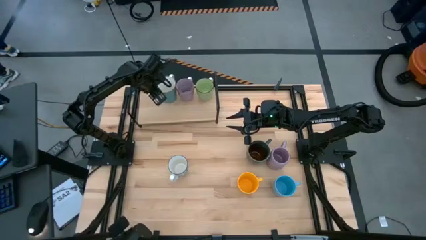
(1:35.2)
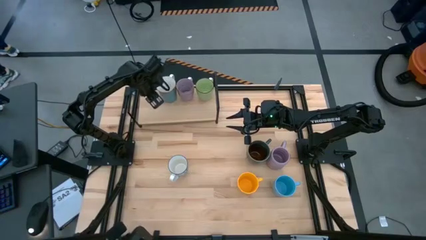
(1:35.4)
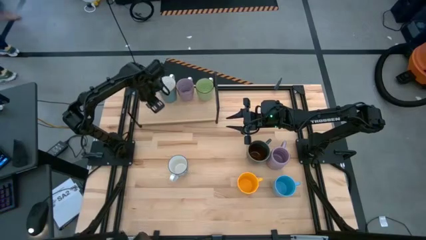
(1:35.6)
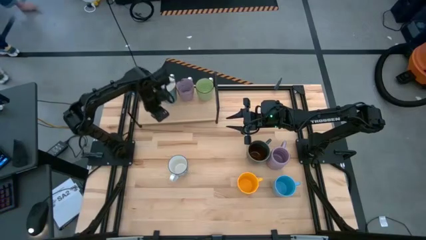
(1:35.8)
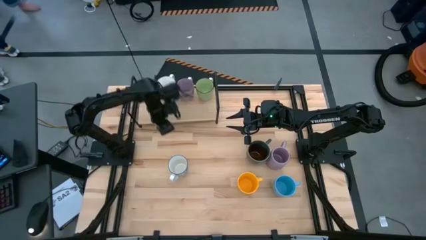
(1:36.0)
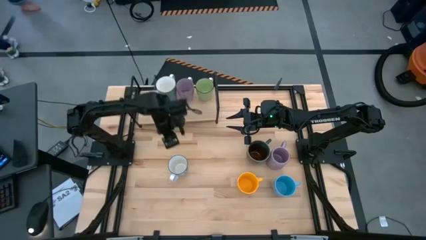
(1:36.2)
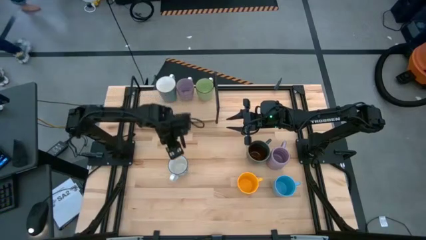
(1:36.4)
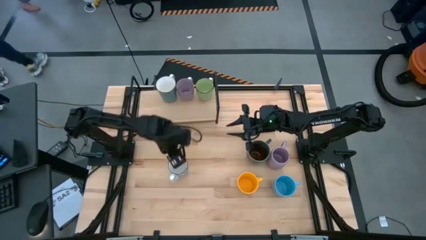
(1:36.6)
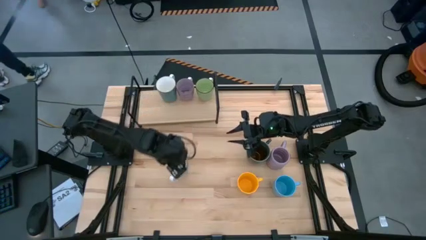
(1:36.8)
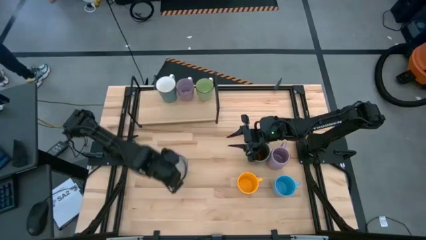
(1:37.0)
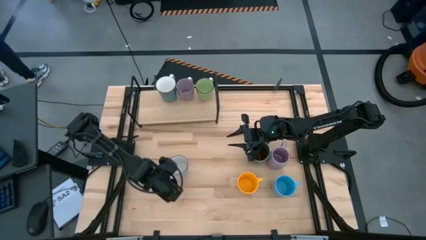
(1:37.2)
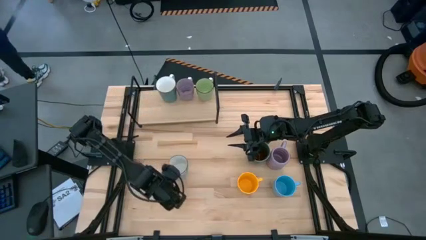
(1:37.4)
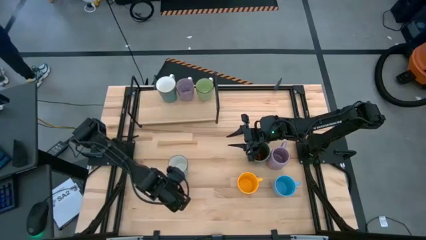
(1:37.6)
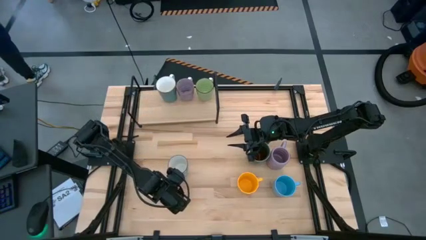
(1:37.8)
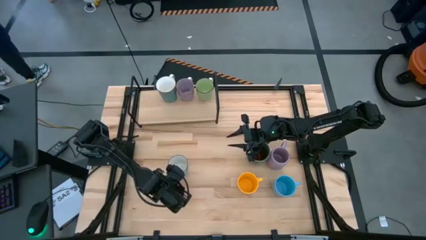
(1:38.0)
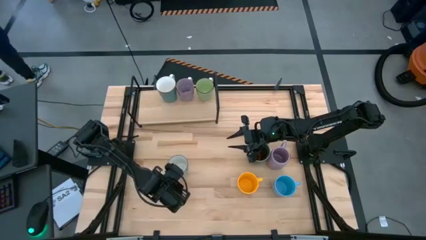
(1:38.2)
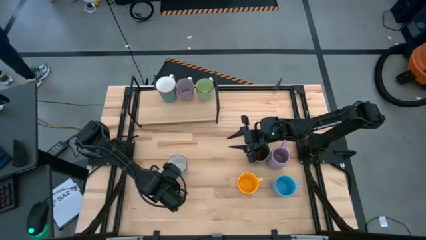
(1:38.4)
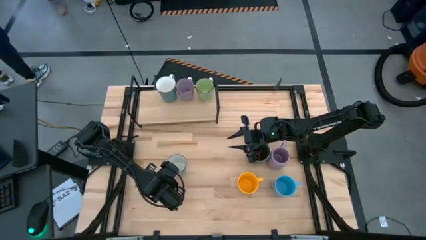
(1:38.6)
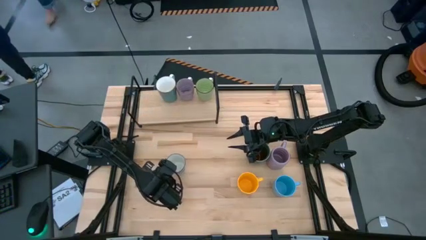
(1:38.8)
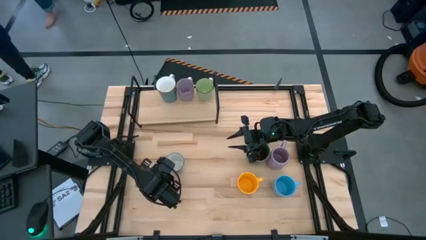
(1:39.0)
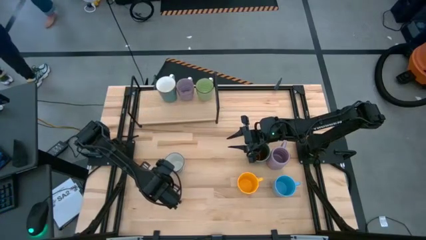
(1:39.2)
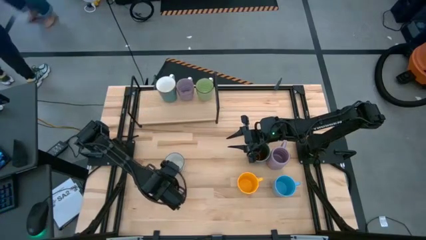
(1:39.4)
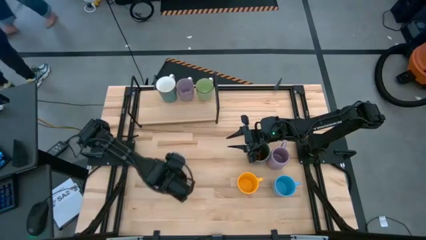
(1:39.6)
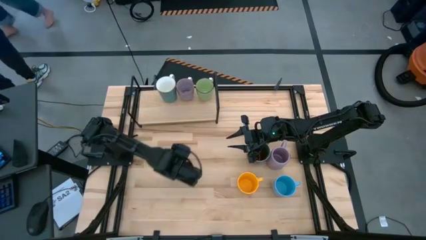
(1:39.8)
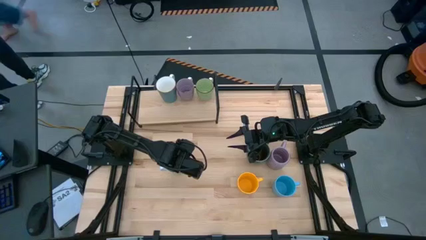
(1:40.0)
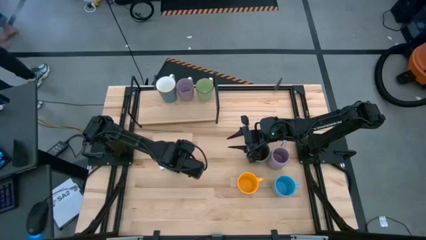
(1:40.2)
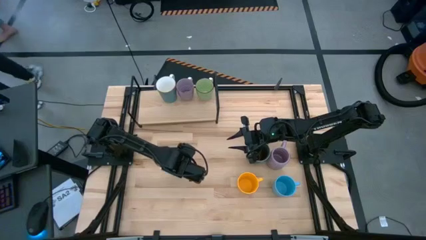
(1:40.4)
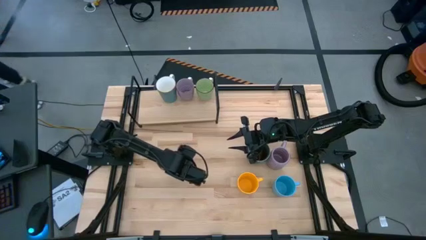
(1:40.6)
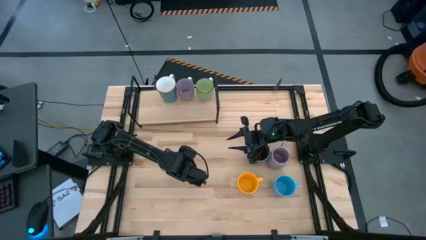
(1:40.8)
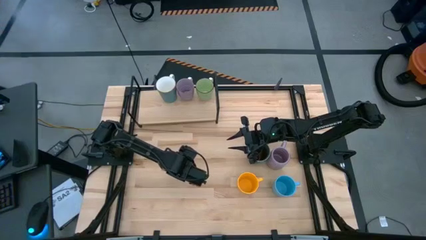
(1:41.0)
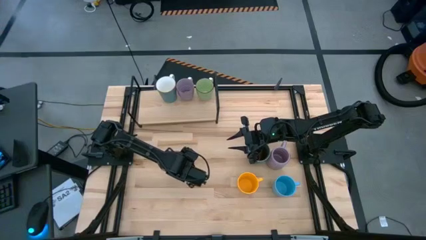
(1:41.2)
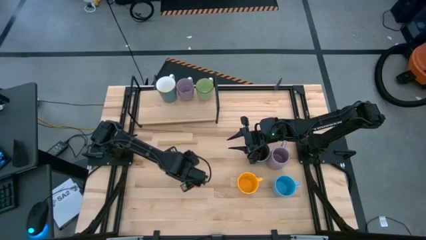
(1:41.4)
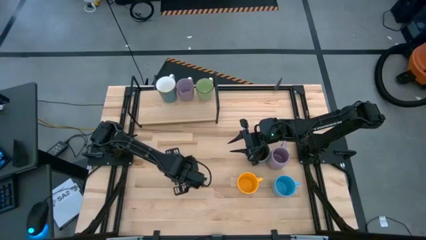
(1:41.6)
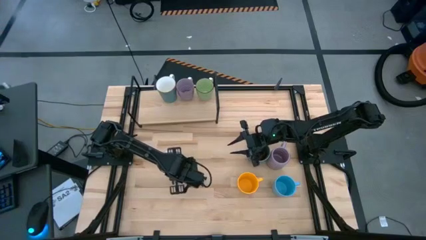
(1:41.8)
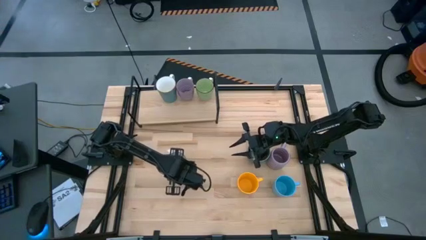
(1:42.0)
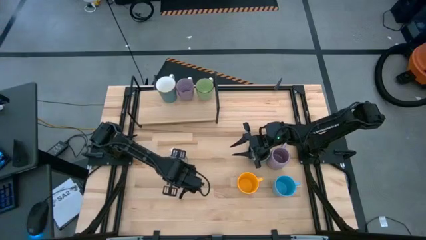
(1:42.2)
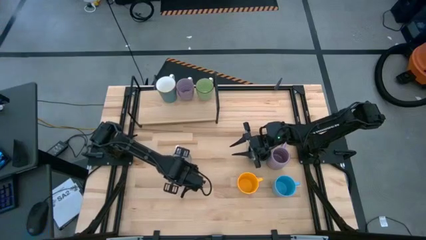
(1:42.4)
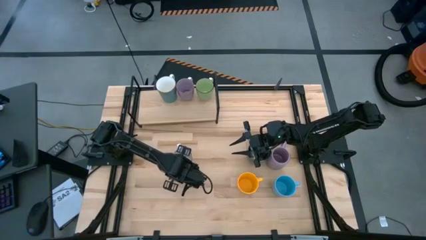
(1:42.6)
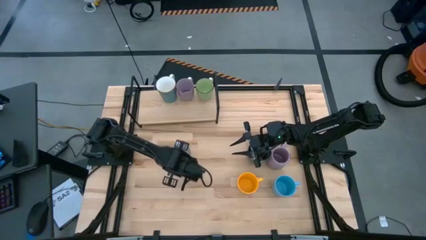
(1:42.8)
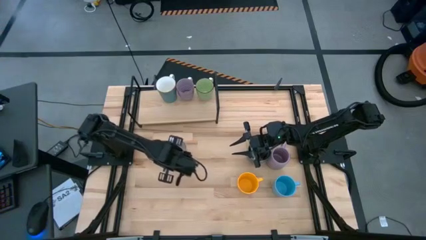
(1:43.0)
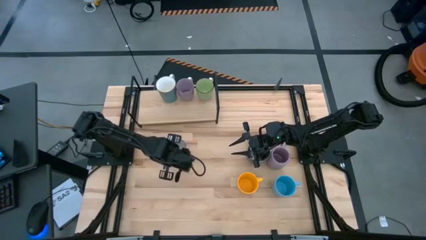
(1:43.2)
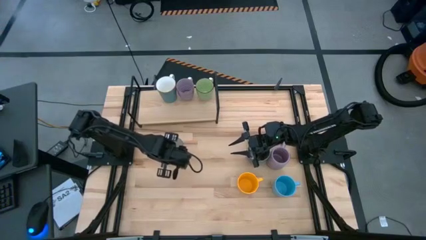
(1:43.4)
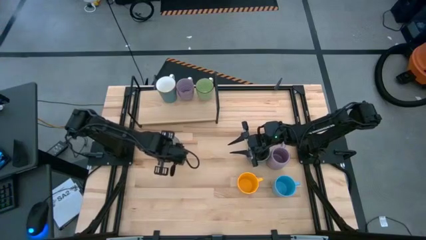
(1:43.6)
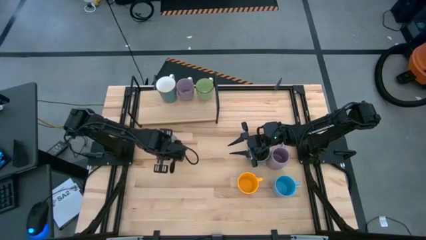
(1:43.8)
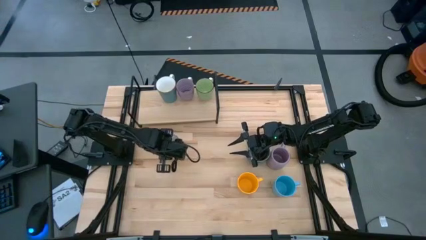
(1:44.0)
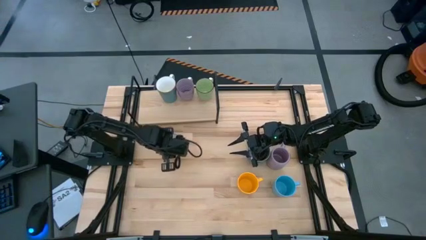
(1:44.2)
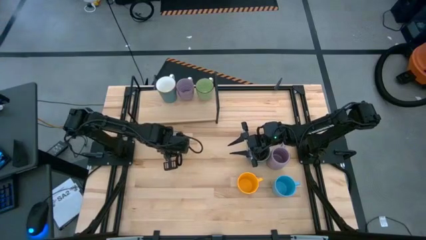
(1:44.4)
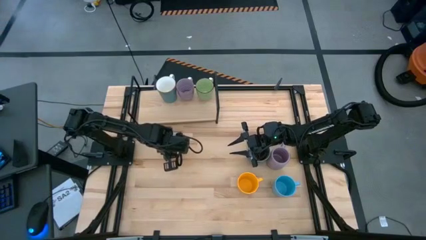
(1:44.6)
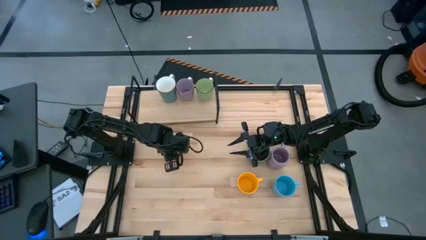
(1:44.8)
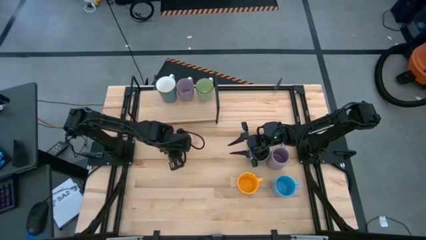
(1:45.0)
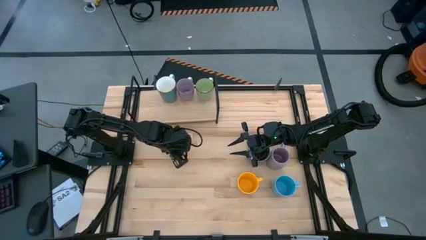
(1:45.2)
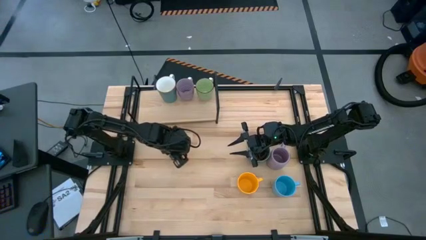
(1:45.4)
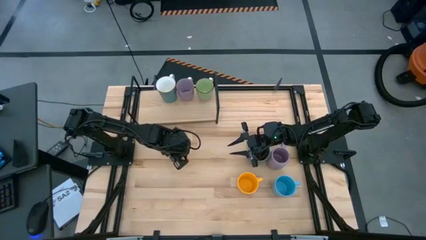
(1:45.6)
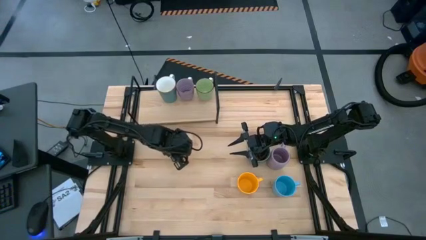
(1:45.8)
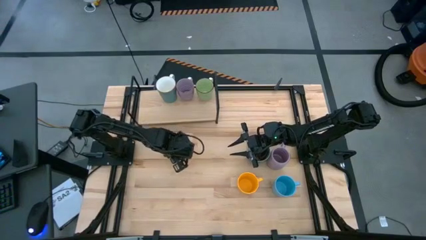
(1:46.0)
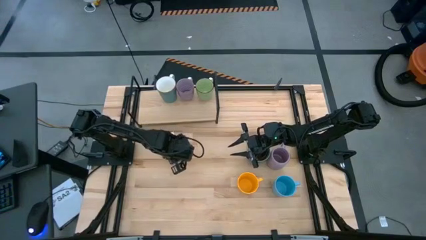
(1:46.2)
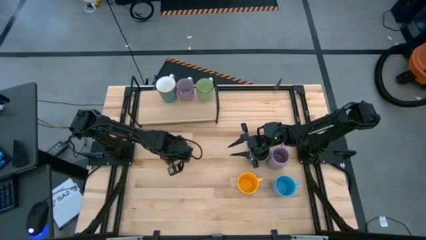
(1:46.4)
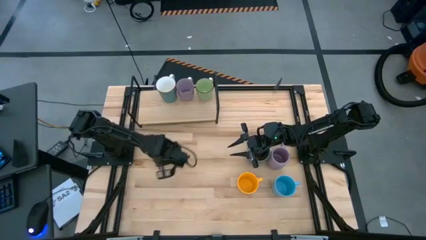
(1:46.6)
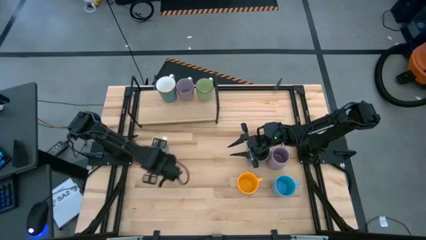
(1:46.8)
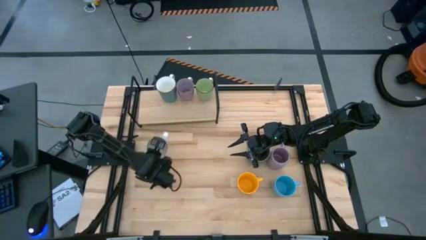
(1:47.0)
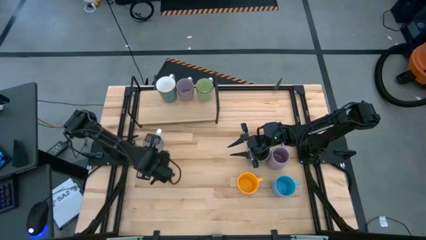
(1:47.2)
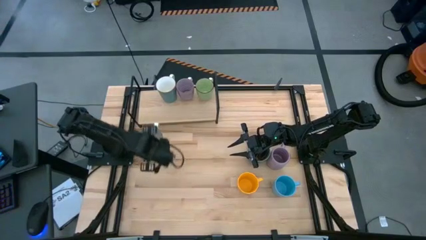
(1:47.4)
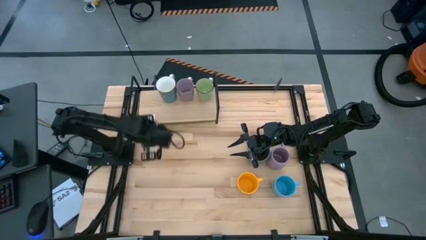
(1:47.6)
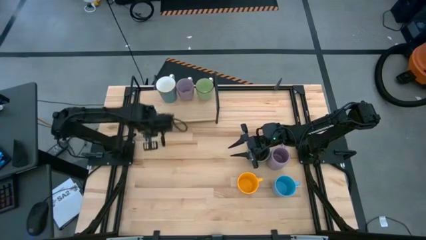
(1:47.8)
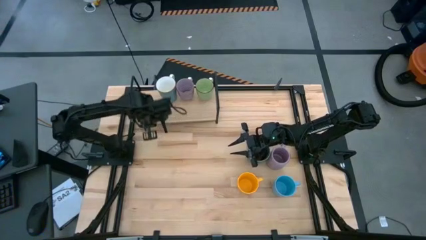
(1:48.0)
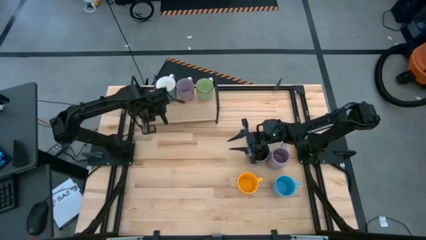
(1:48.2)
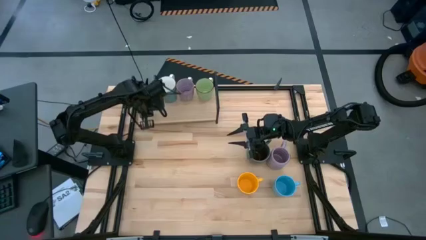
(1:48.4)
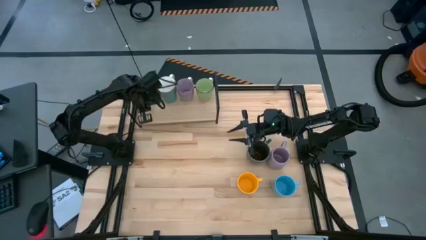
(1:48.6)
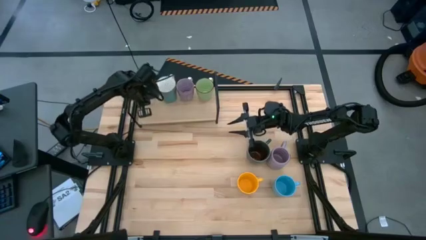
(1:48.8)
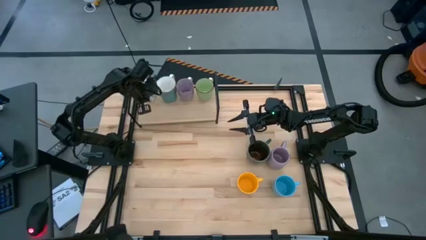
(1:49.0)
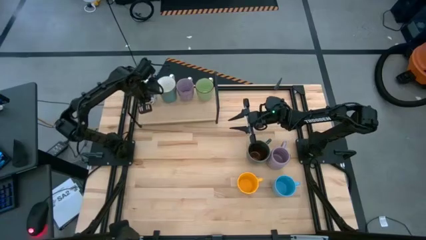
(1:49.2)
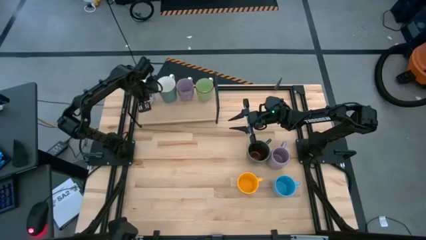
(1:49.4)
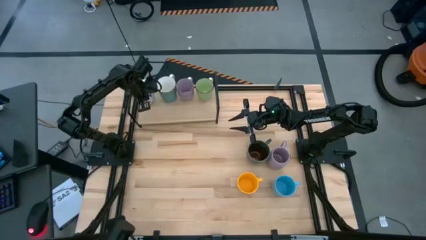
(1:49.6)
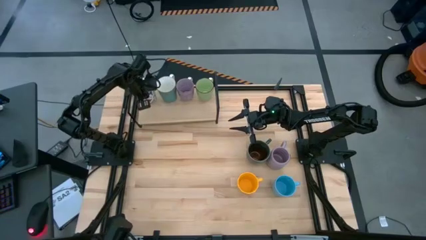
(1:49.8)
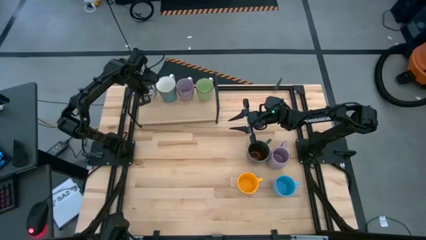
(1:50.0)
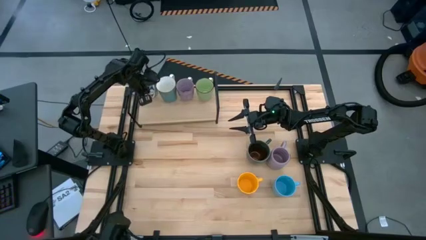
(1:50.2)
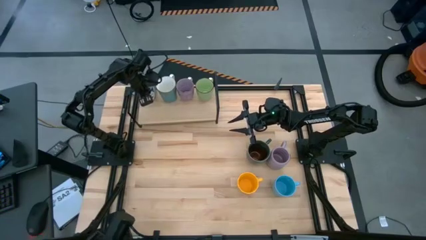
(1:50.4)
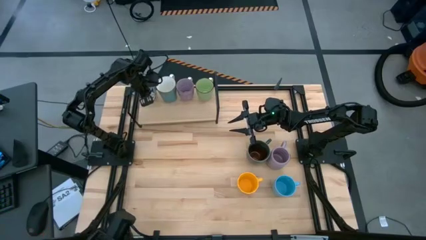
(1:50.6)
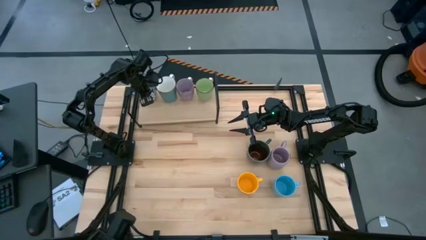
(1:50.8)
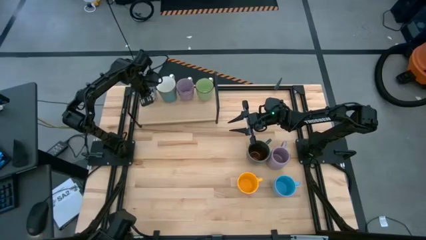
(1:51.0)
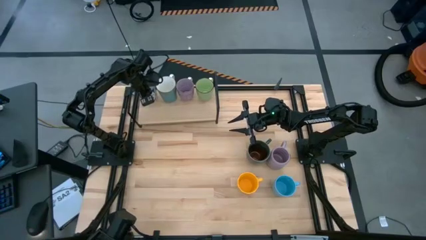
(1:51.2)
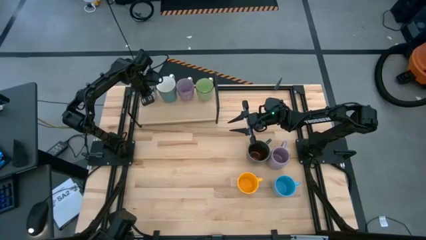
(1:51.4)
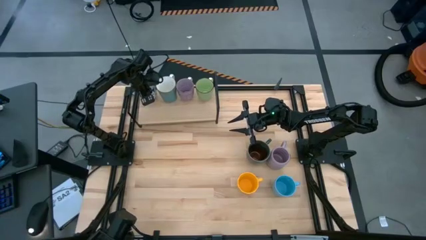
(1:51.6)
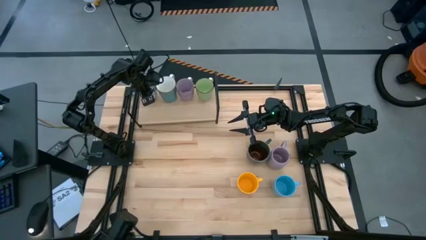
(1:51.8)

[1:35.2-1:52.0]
Task: Place coffee mugs
Put the blue patterned mug on the shelf
